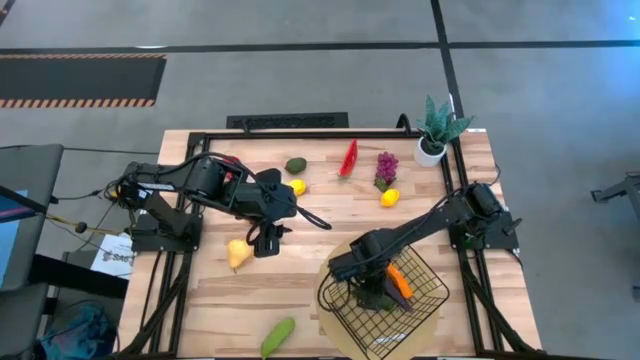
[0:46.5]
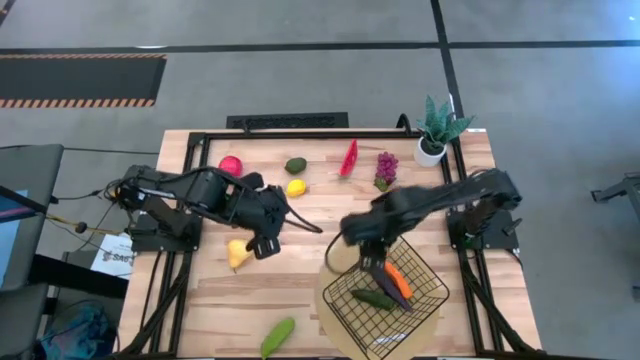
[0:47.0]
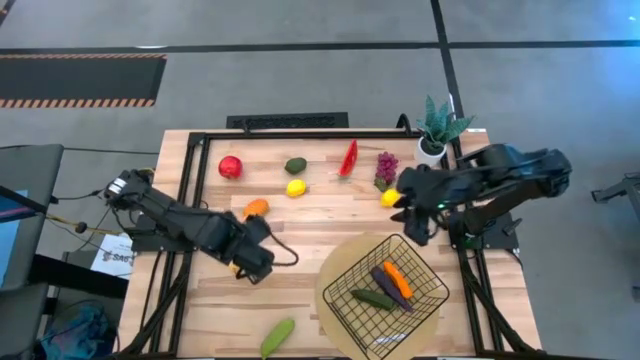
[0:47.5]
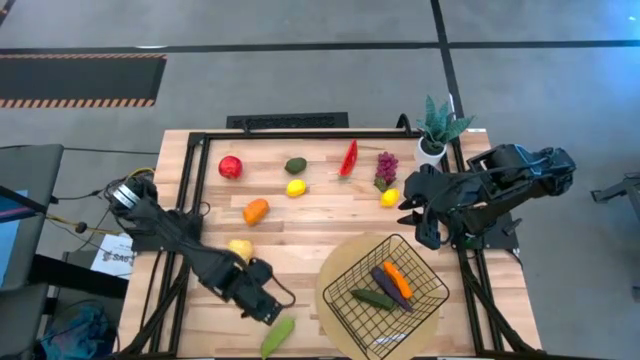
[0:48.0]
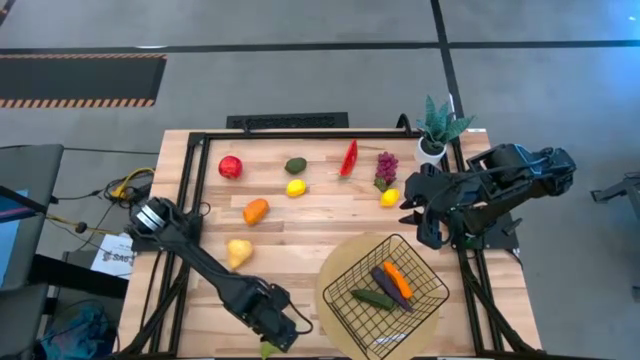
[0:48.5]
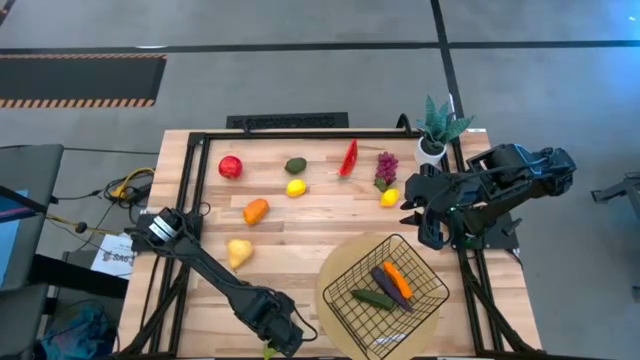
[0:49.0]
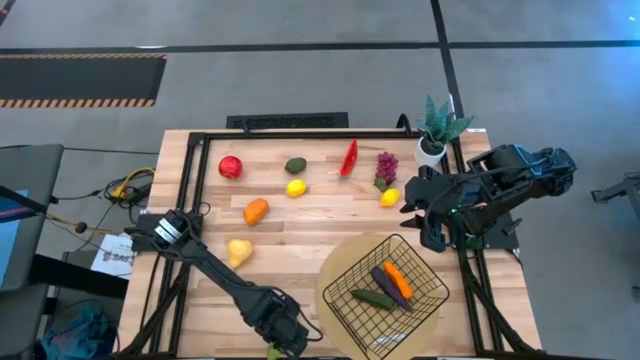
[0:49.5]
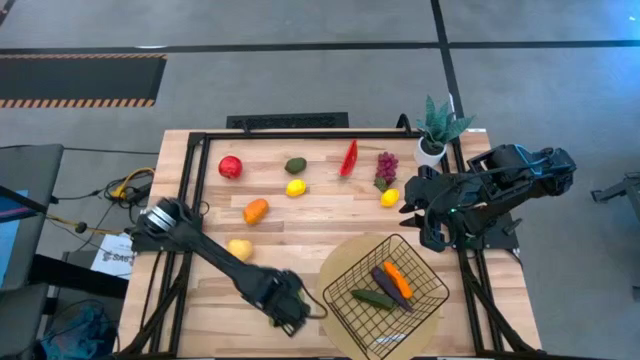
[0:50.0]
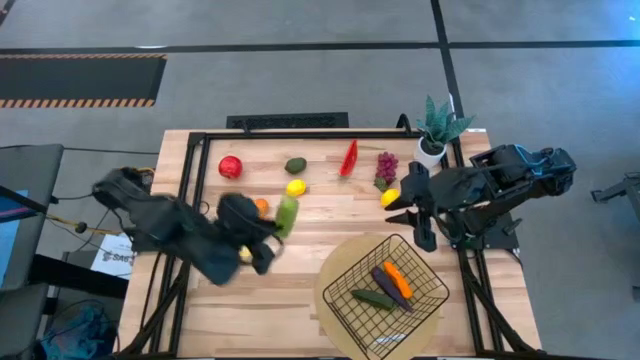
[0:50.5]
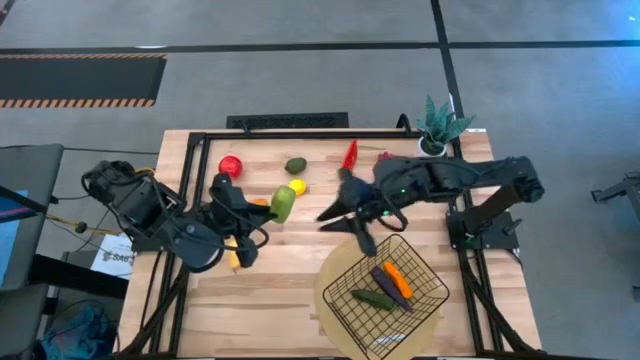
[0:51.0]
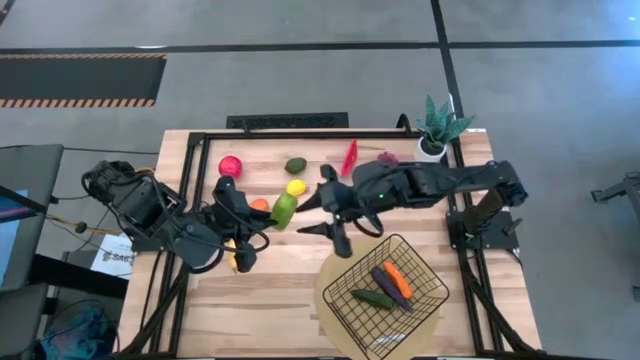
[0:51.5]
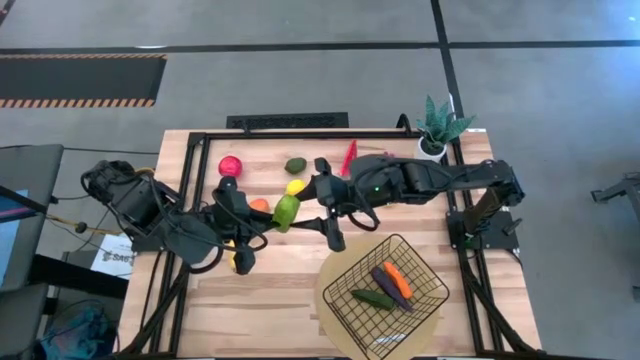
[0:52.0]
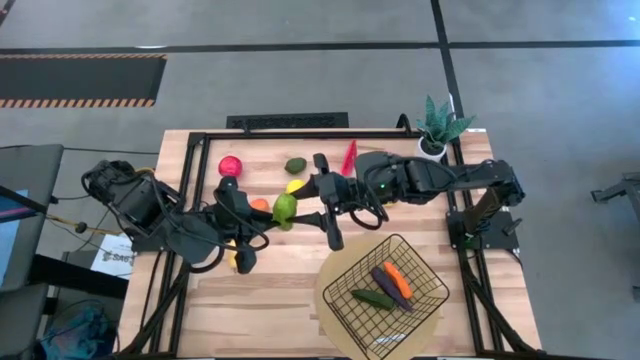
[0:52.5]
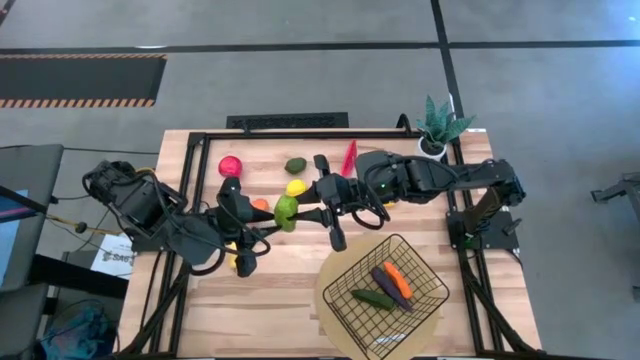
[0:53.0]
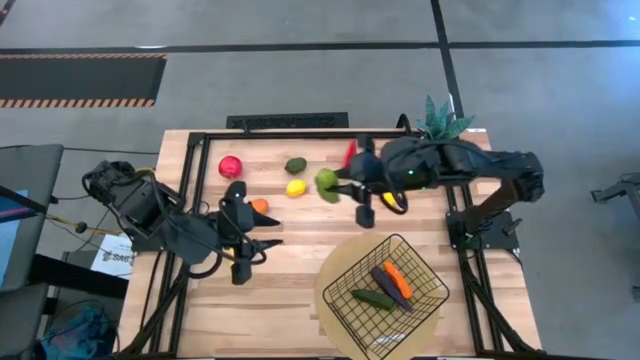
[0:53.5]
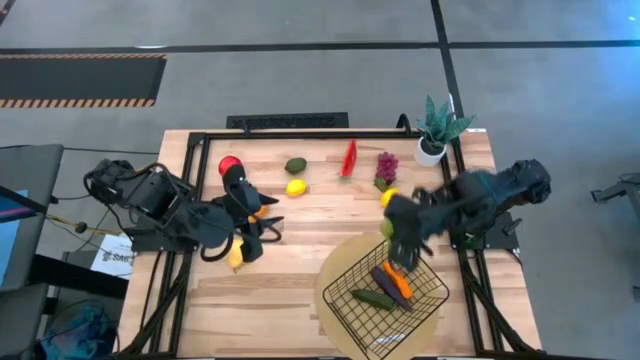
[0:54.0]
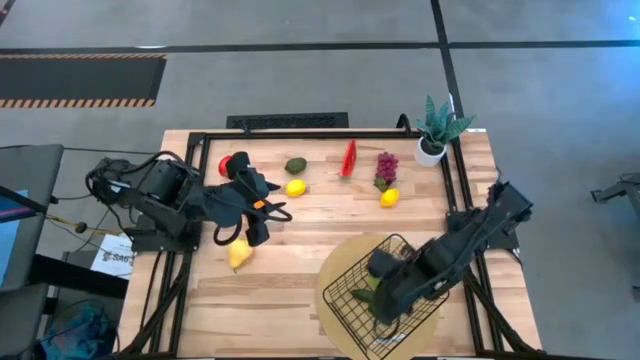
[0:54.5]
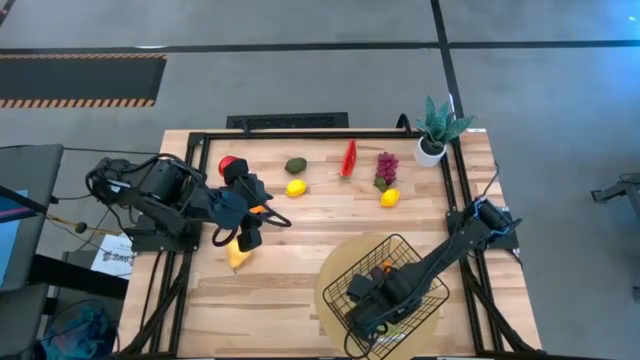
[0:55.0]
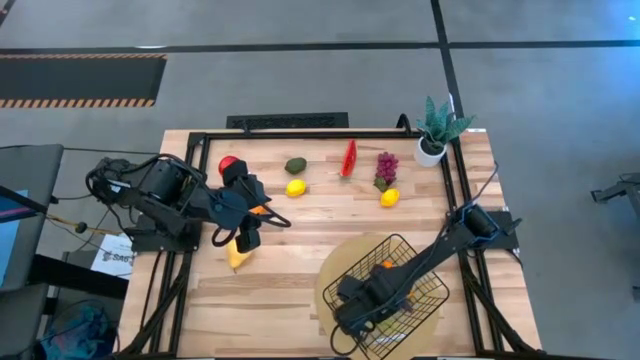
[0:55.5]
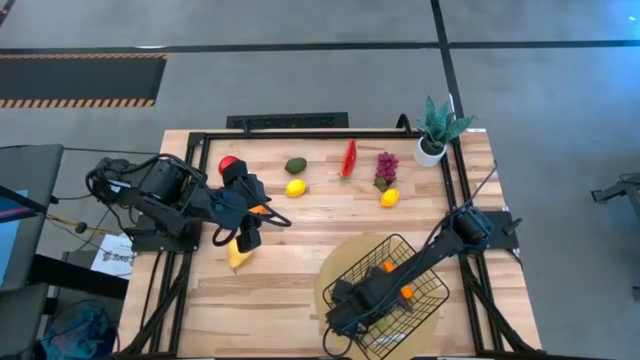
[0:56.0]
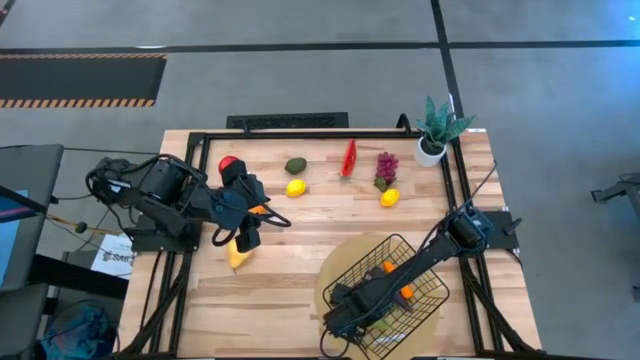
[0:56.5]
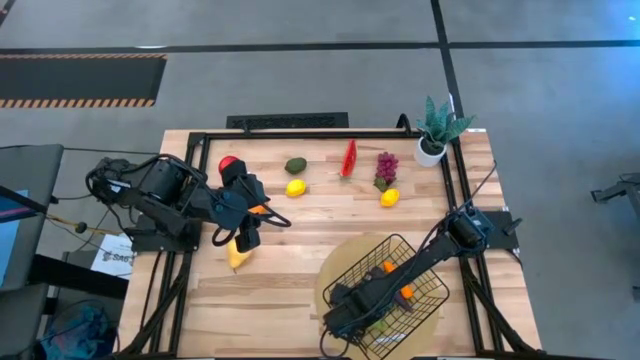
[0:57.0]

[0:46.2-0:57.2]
Task: Build produce basket
Put the cucumber into the mesh basket

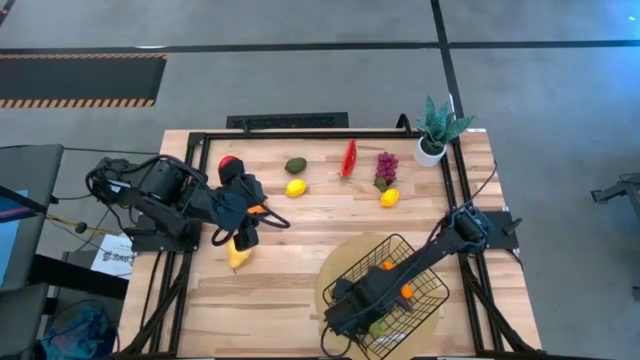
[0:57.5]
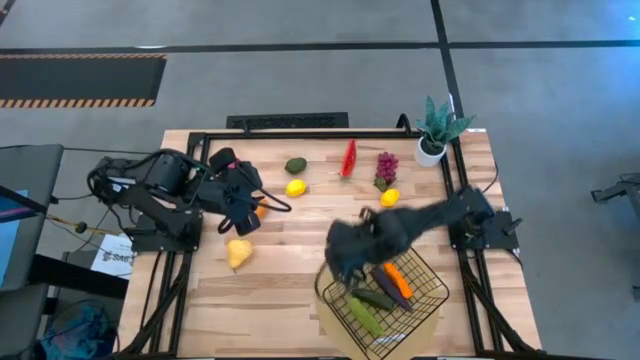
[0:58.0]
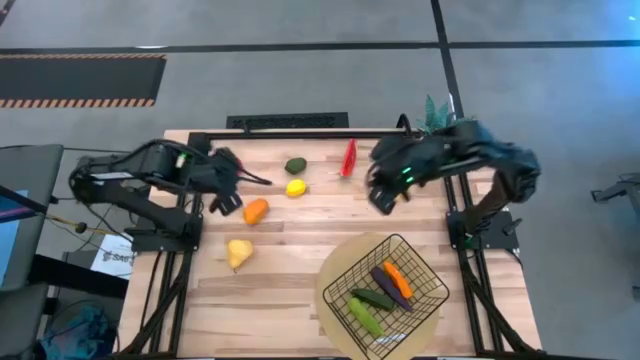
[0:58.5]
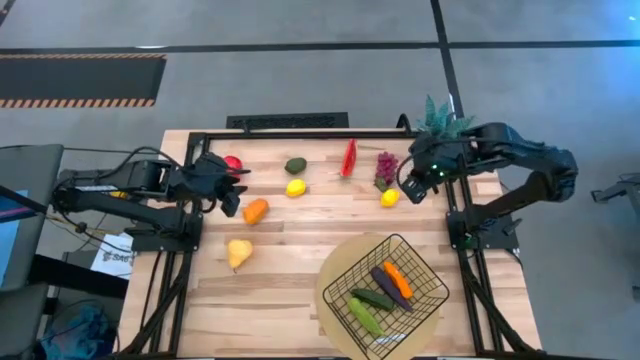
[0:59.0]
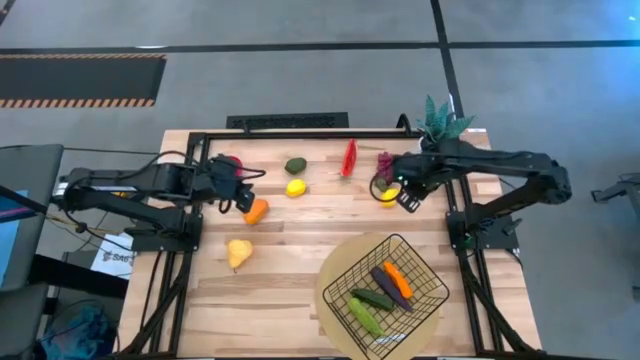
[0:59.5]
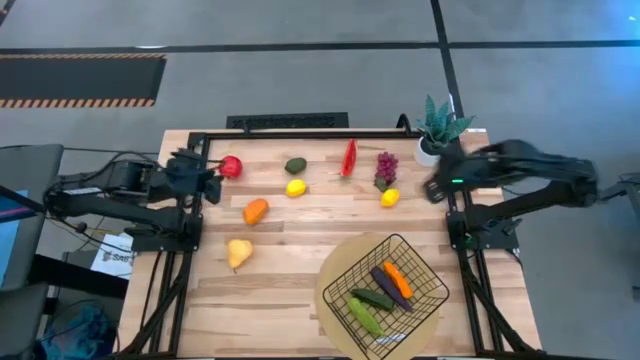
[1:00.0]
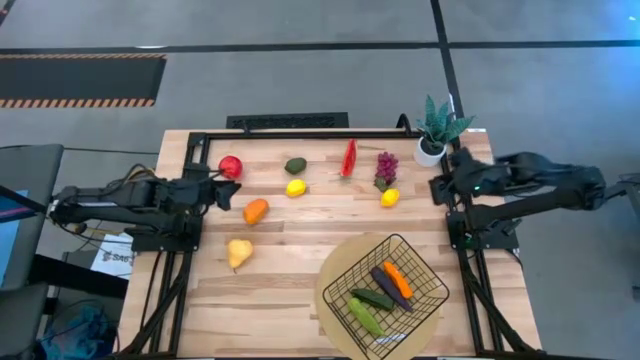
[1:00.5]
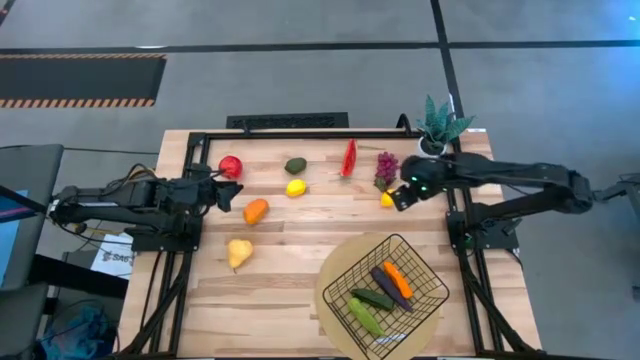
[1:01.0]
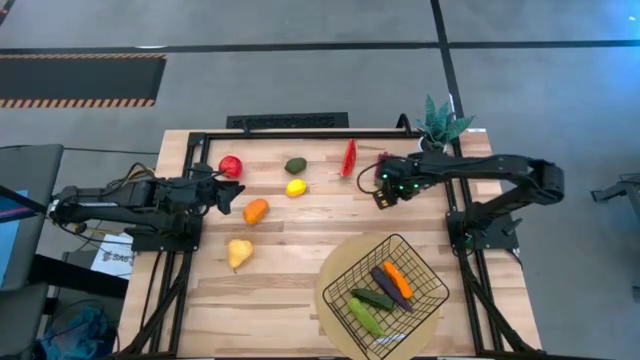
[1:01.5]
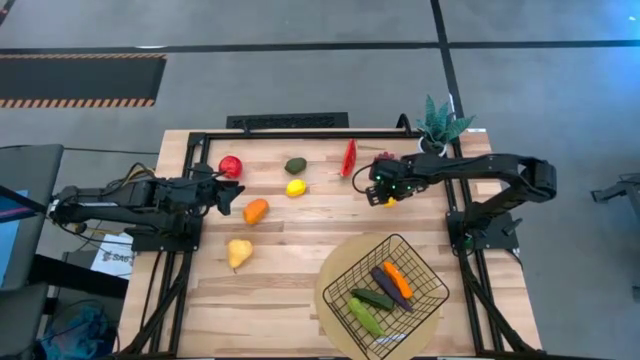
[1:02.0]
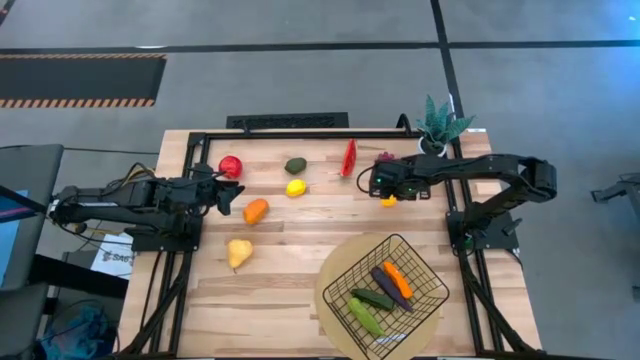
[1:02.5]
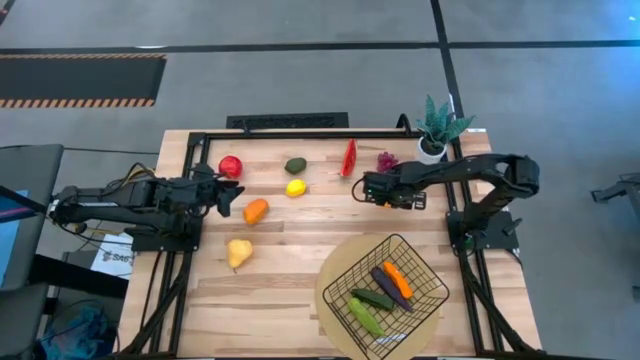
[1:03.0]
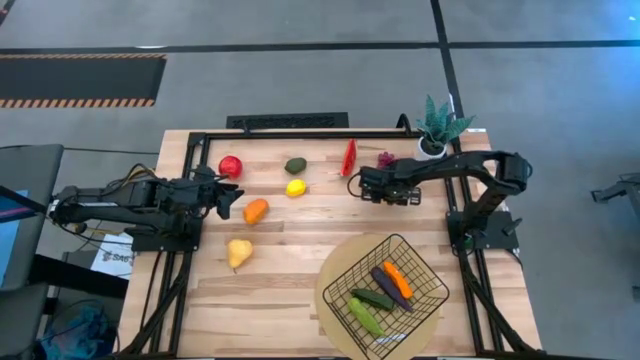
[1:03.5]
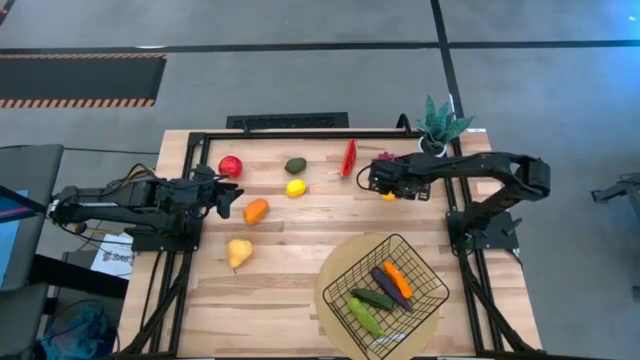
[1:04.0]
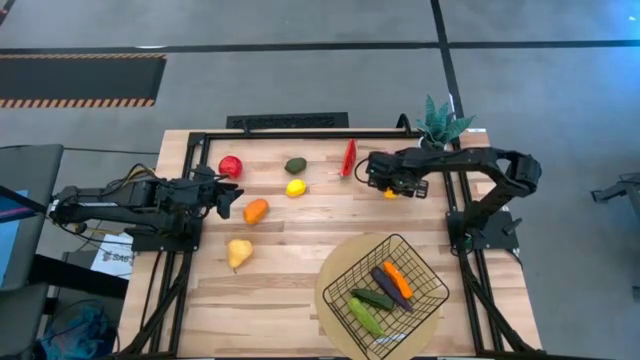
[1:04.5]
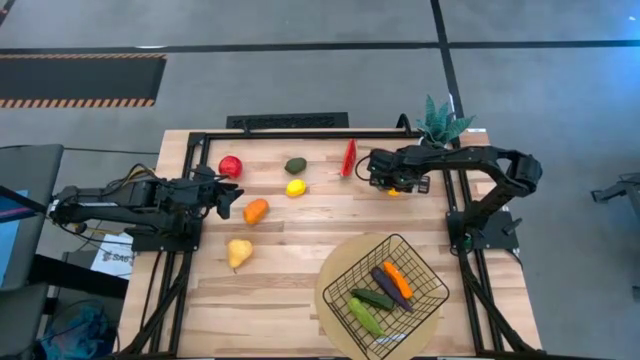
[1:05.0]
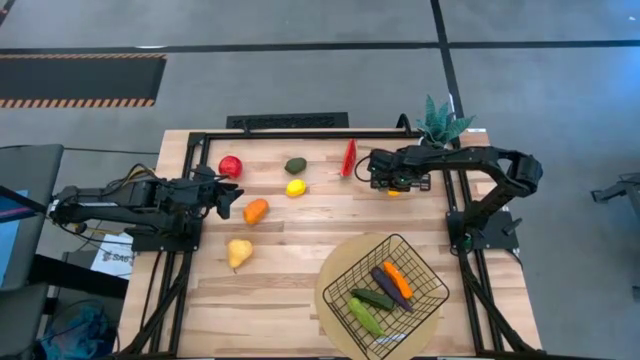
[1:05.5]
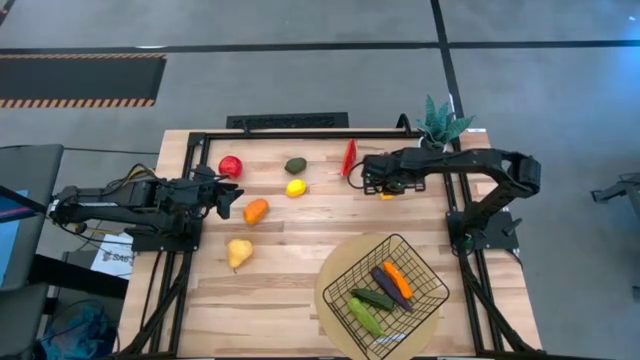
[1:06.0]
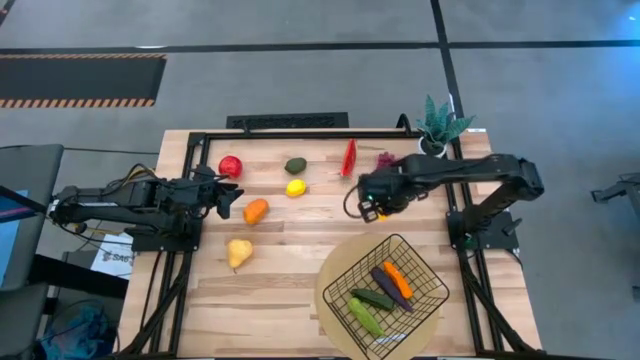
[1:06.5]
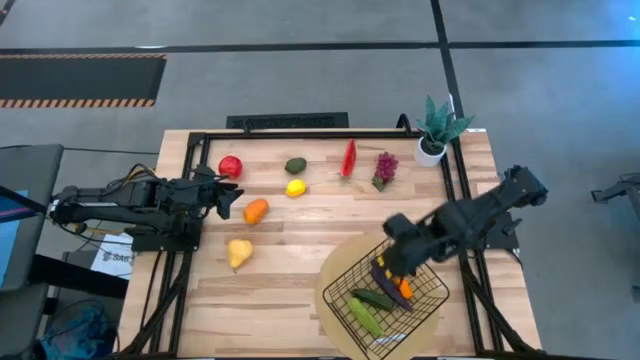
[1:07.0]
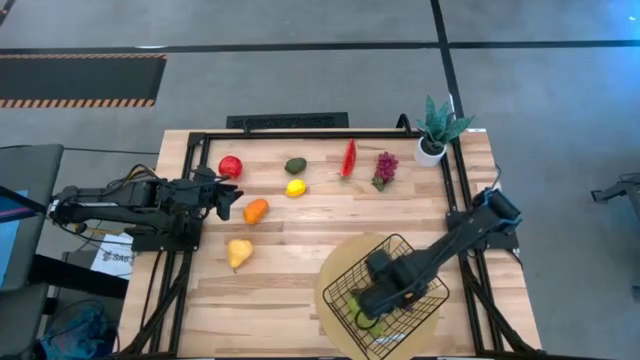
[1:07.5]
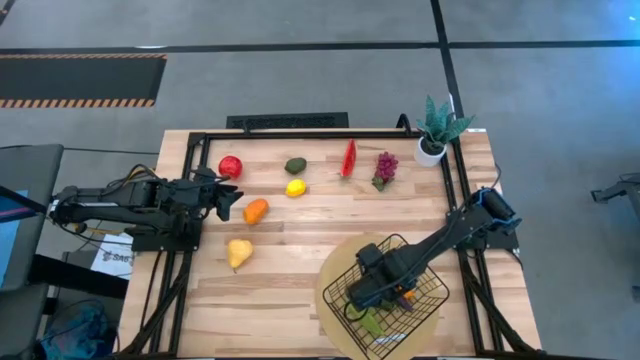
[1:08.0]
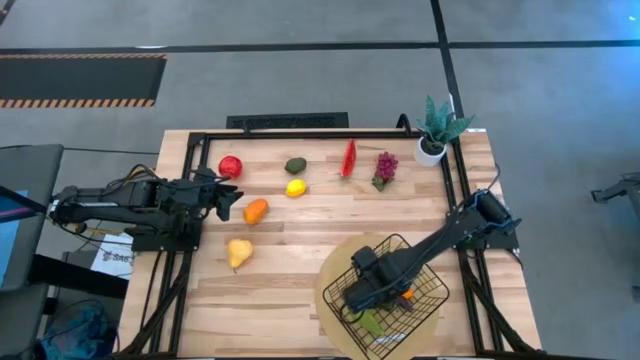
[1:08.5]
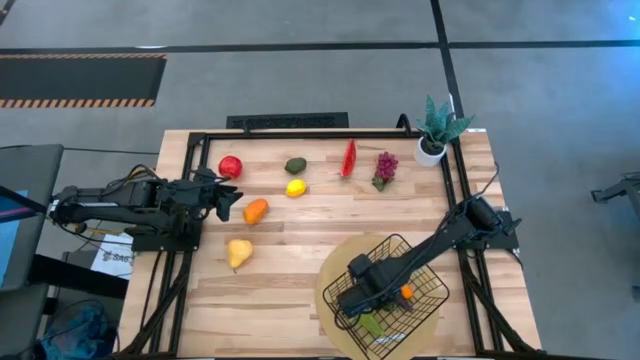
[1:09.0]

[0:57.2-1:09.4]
Put the right lemon into the mesh basket
